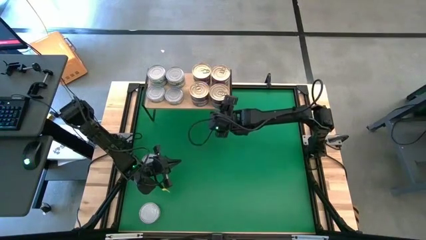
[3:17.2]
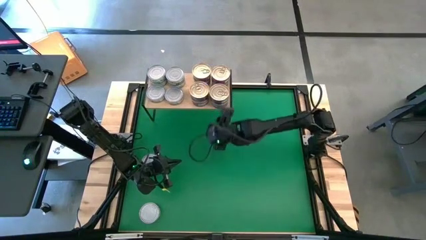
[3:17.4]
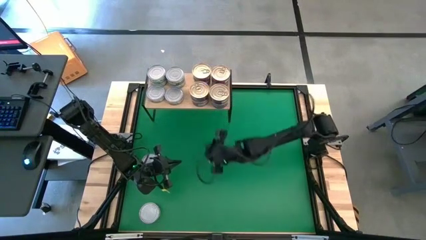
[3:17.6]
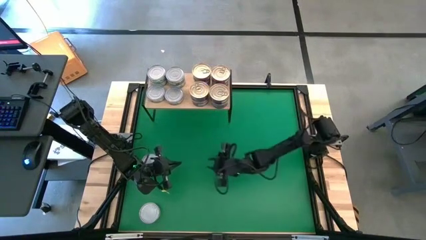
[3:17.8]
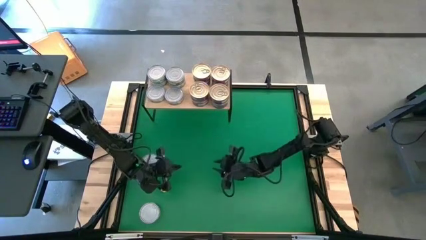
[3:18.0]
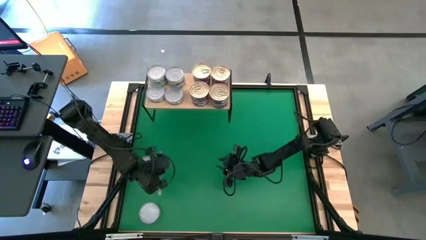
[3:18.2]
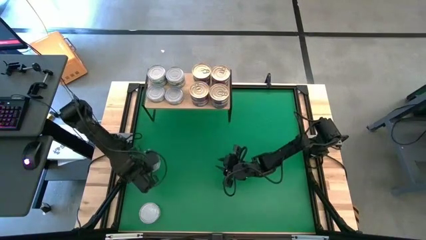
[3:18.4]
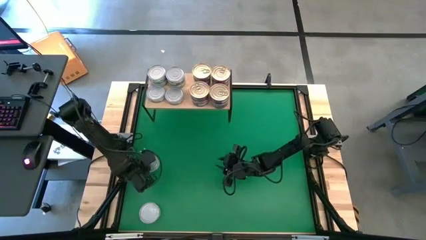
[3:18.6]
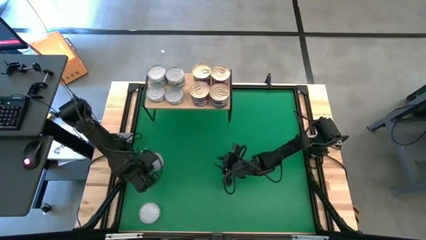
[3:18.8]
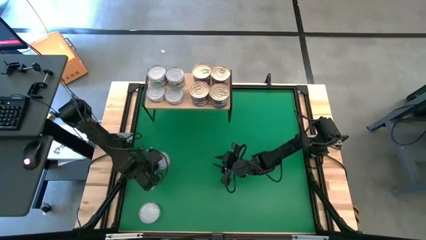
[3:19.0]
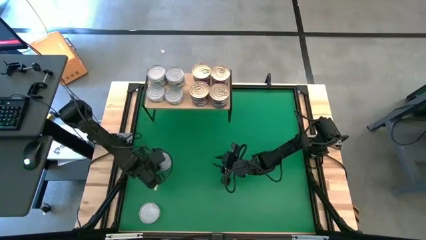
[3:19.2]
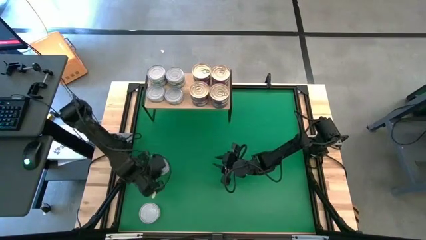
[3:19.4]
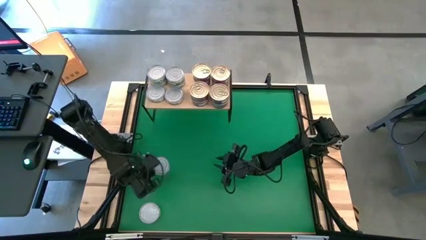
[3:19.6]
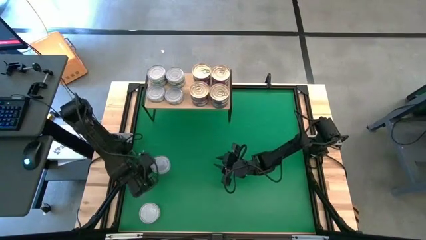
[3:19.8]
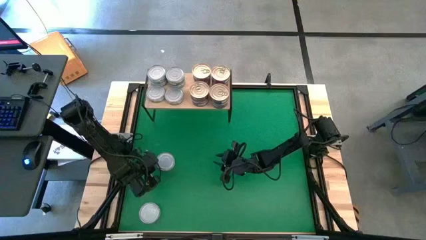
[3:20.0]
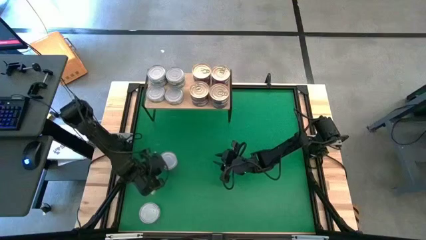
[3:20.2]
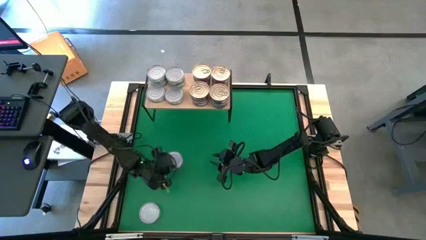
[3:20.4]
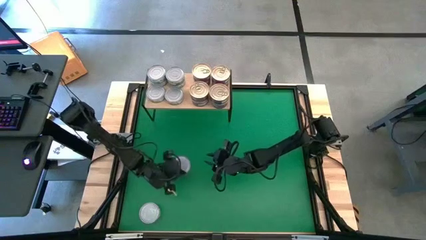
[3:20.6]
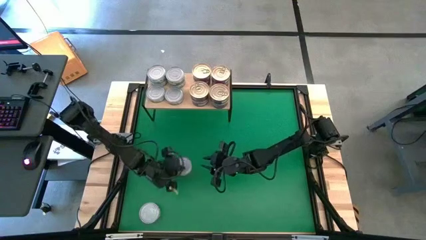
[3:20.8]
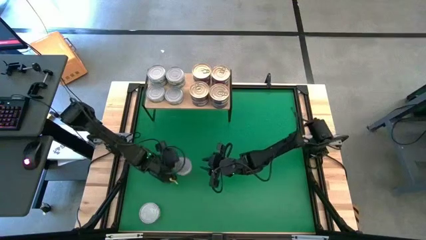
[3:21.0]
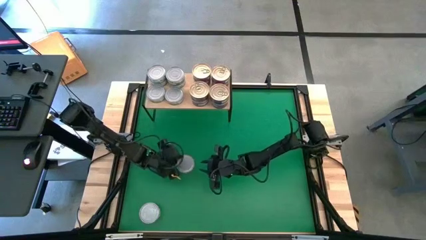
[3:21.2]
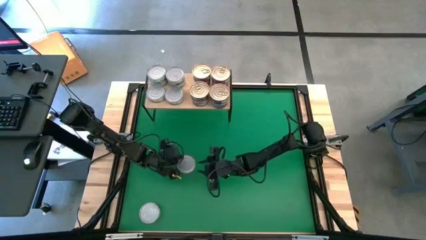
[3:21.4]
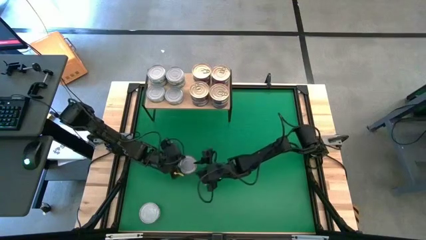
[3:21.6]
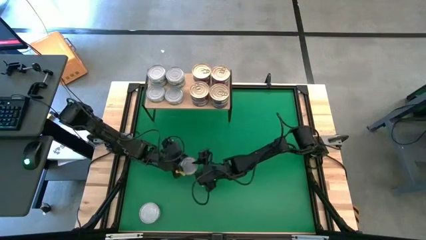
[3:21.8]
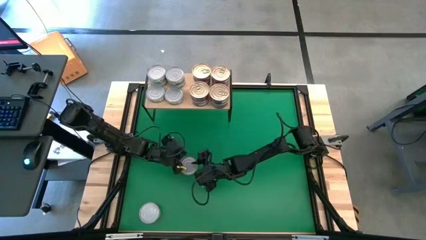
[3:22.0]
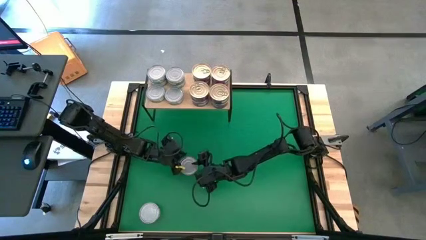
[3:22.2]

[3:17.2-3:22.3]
Task: Stack canned seafood by type on shelf
Stack the green tuna can on the other green tuna can on the shelf

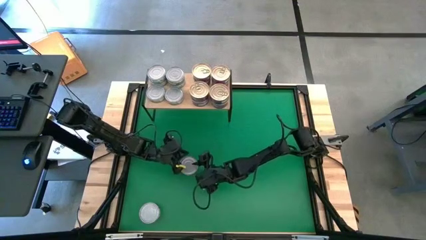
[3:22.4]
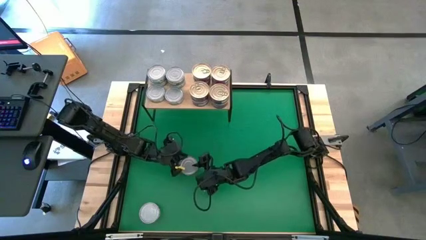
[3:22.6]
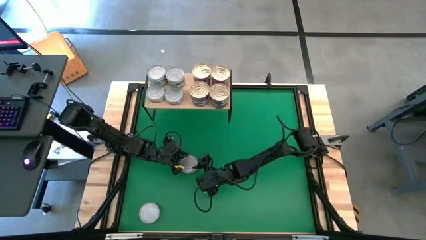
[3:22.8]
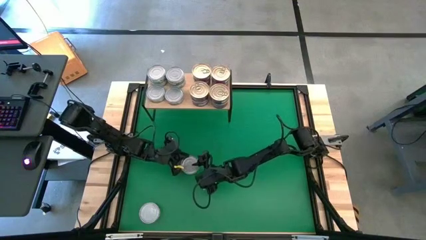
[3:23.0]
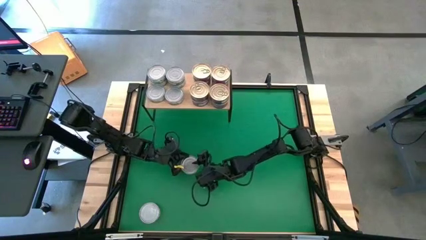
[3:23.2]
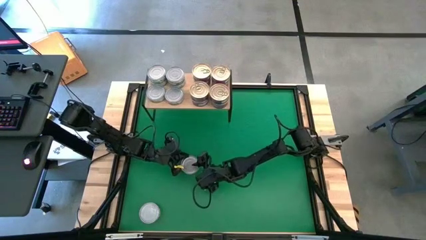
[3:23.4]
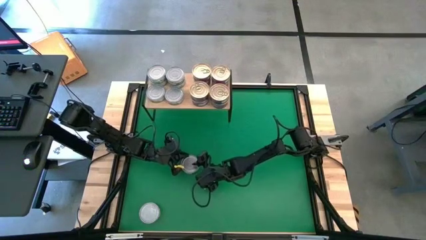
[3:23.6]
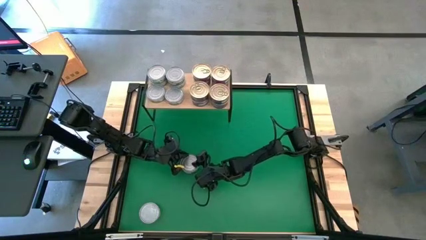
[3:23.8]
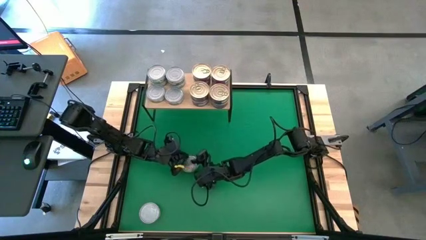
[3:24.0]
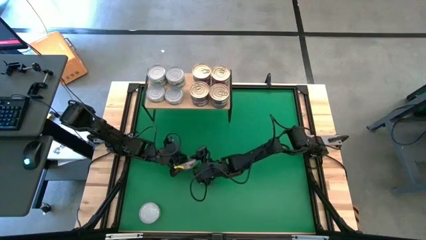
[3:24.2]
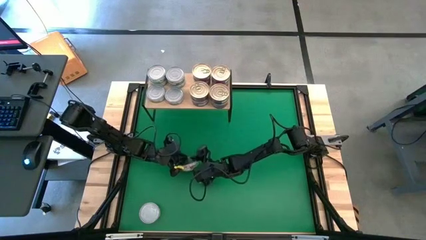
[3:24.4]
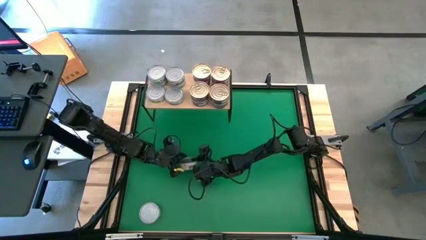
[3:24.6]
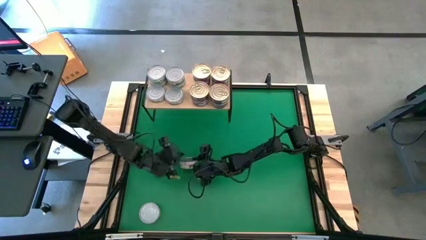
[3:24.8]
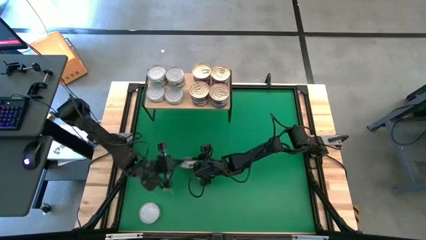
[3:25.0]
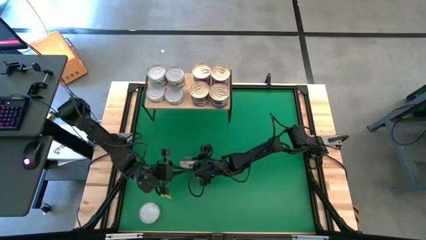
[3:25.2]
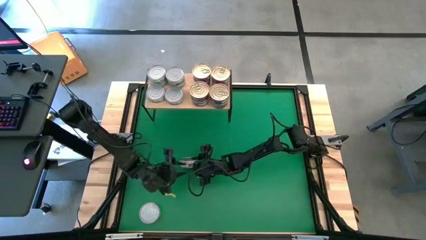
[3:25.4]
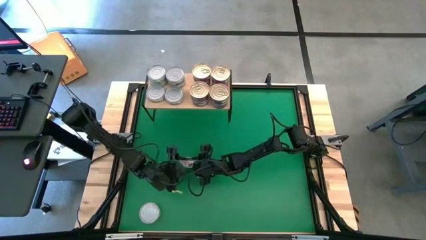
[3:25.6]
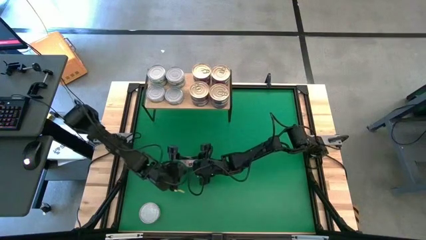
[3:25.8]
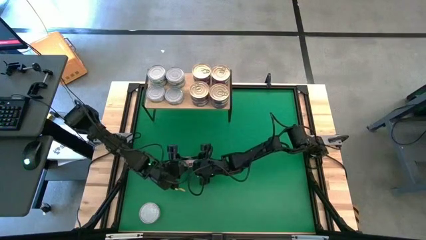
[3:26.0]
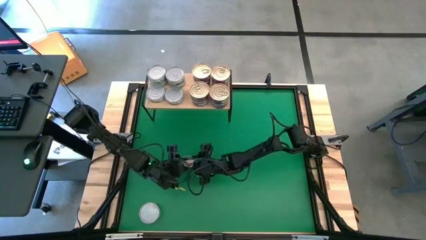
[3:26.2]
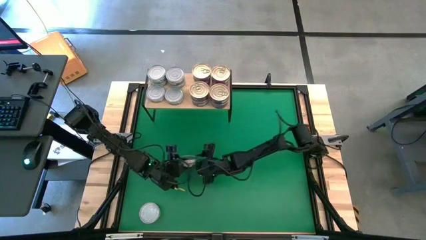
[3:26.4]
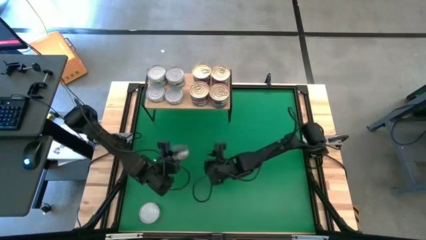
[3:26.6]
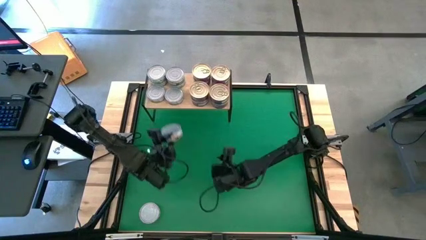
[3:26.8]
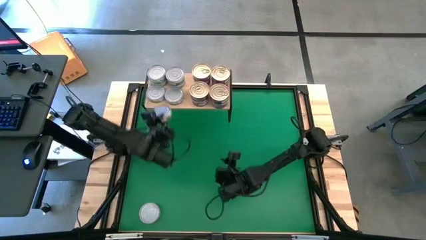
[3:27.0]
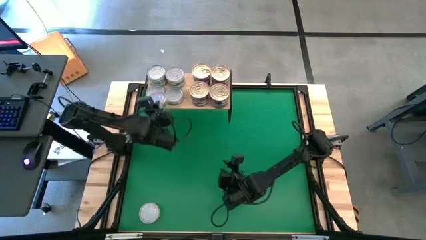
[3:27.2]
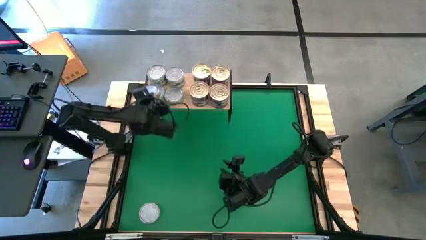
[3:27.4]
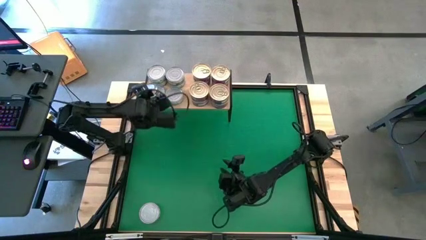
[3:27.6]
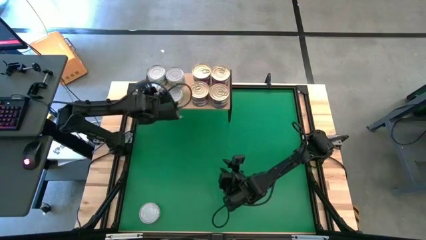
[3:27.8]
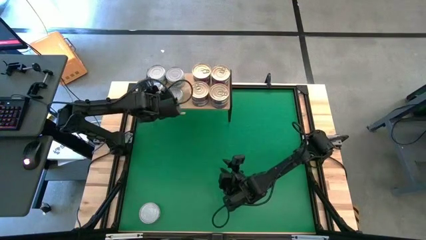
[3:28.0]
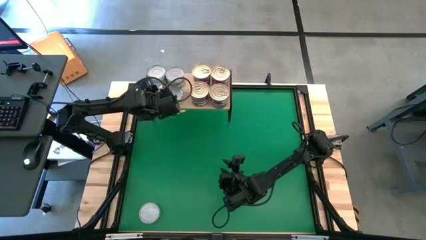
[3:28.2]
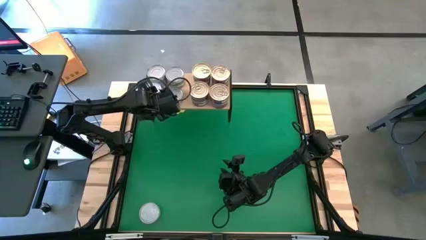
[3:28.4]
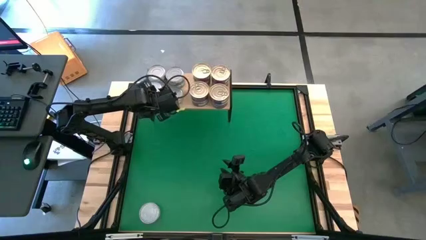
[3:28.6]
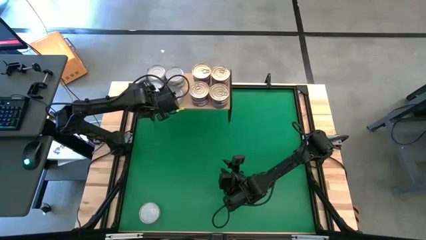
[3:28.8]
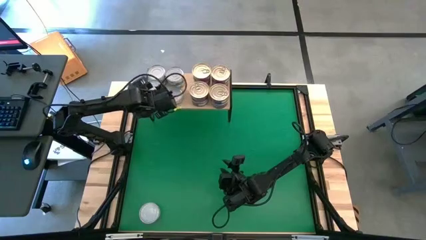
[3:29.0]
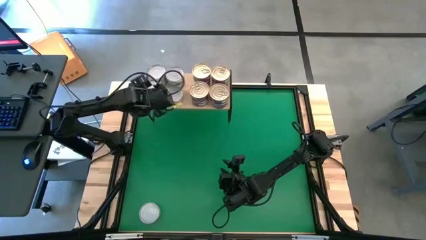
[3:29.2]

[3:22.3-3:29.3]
Stack the green tuna can on the other green tuna can on the shelf
